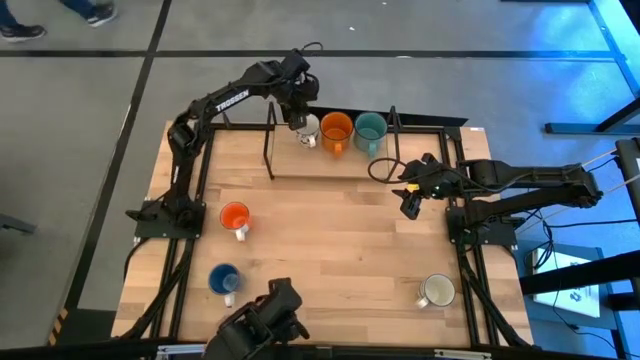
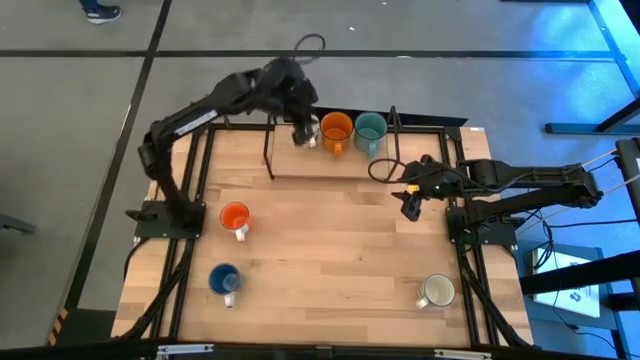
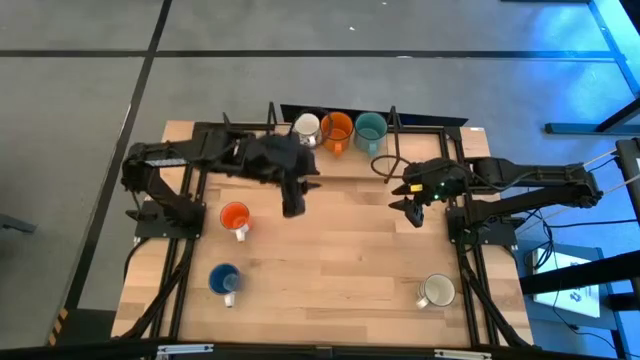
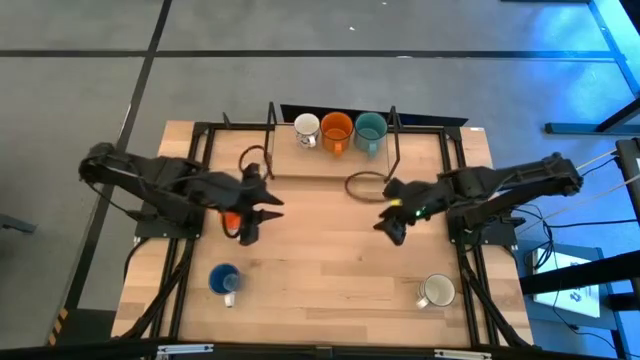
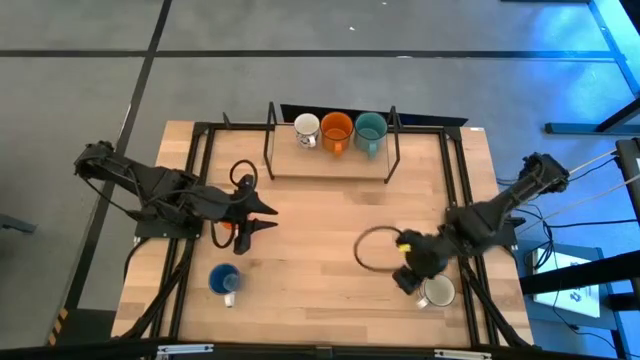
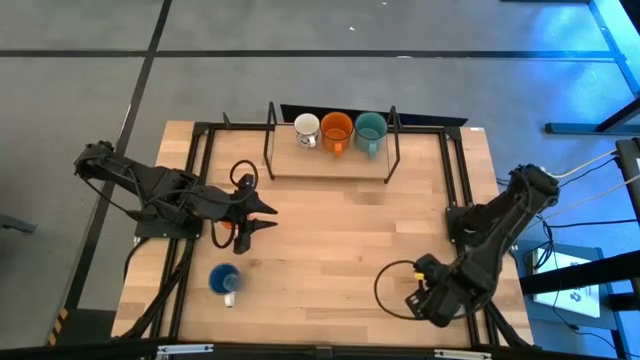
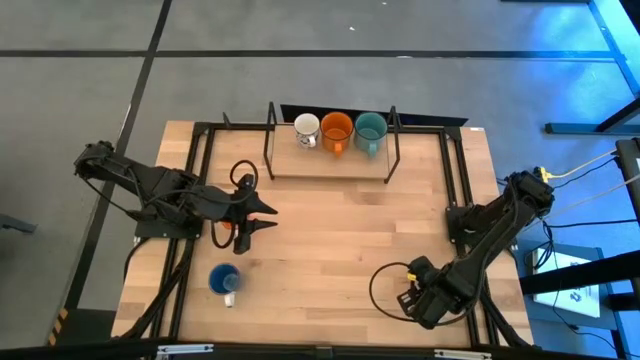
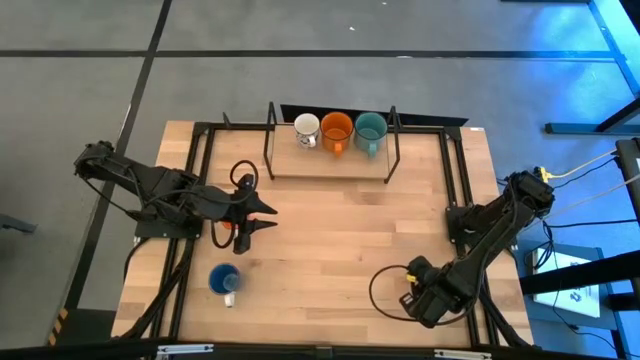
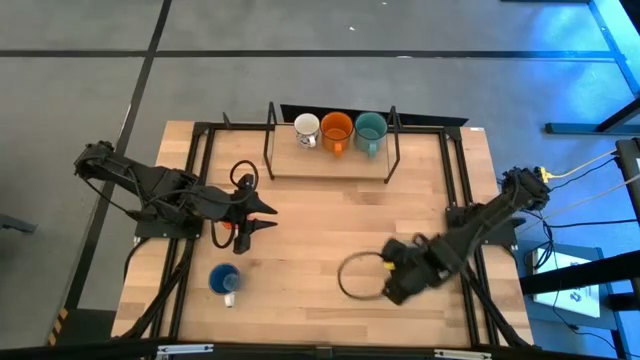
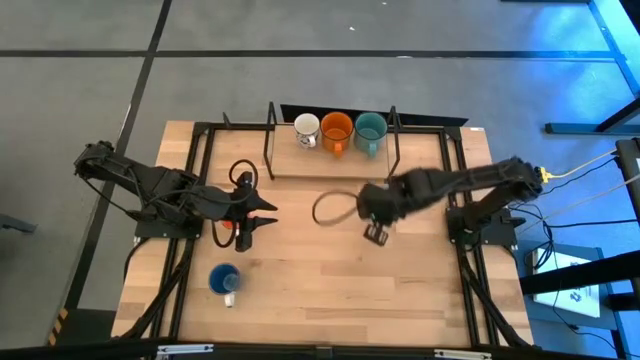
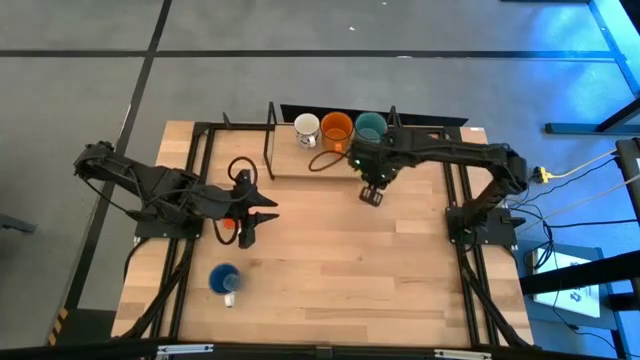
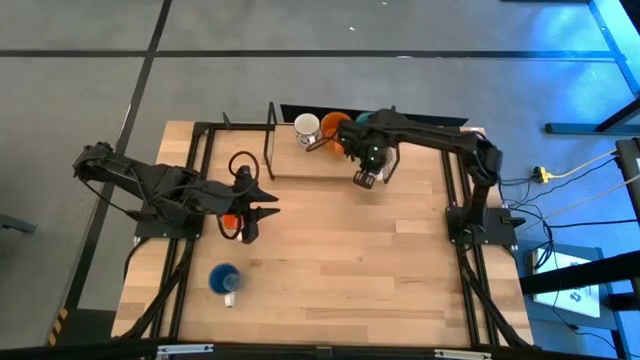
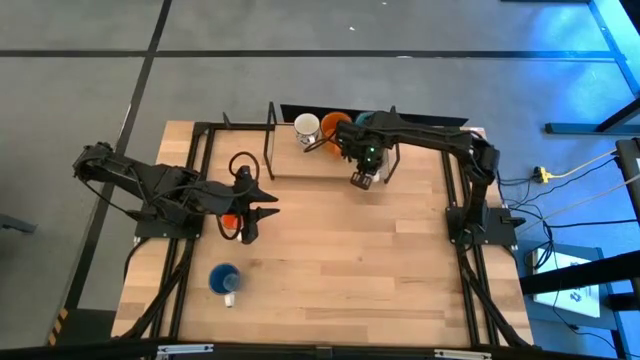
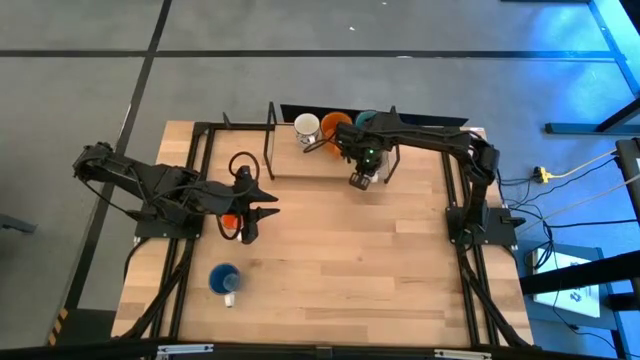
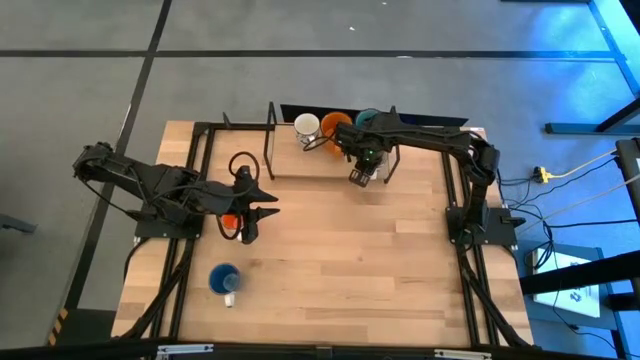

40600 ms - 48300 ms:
Task: Place coffee mugs
Put the white patterned mug on the shelf

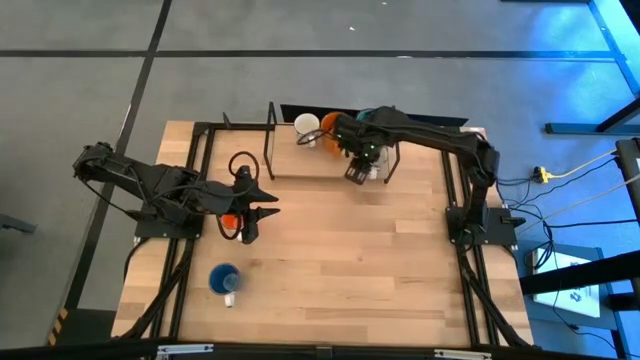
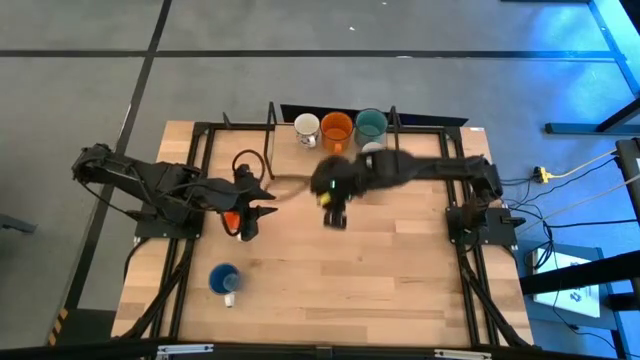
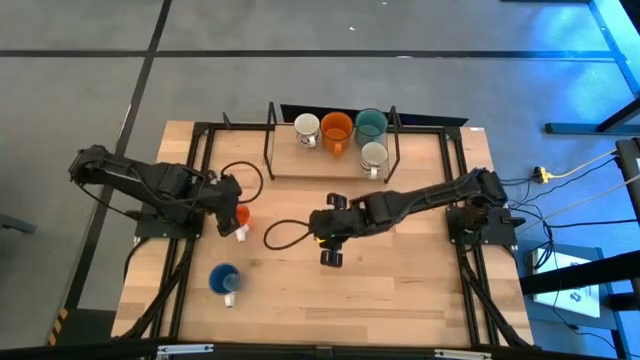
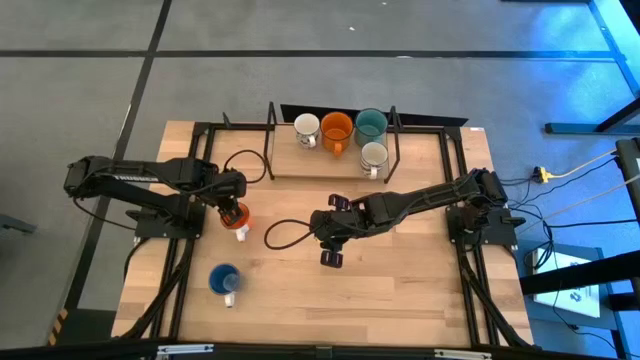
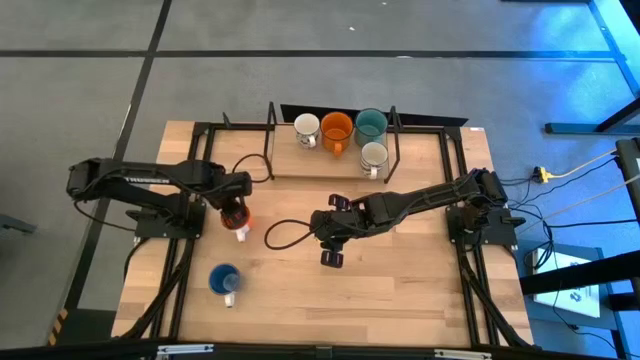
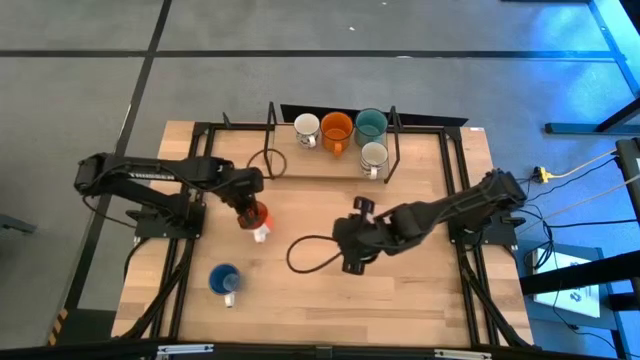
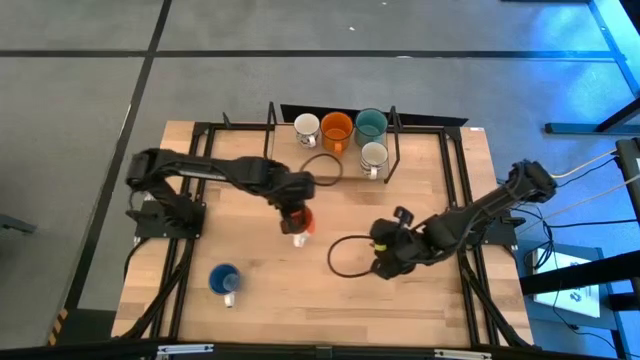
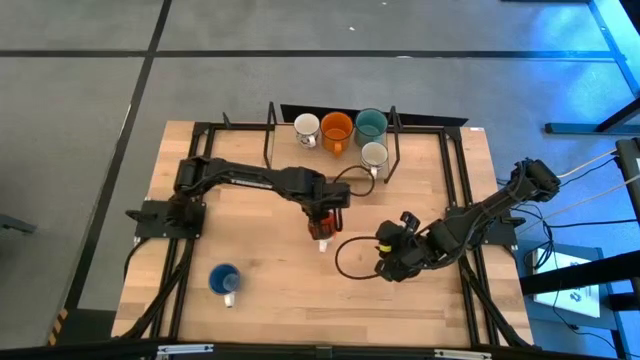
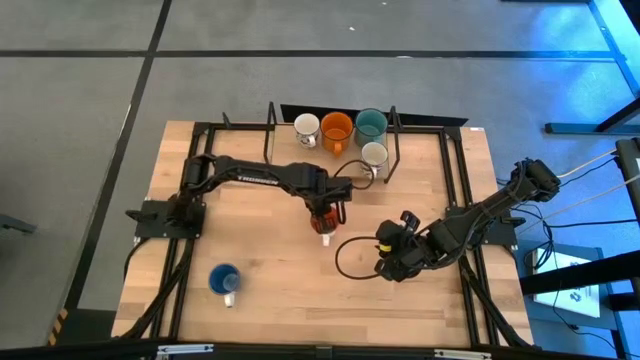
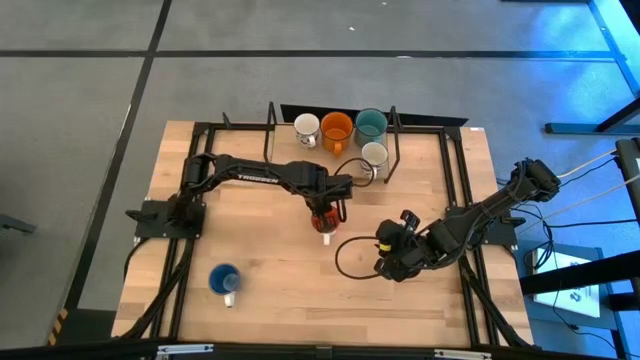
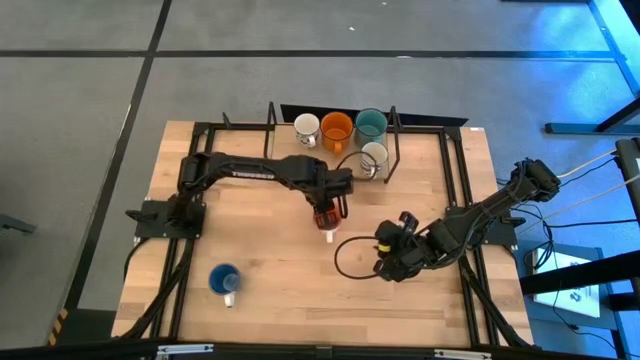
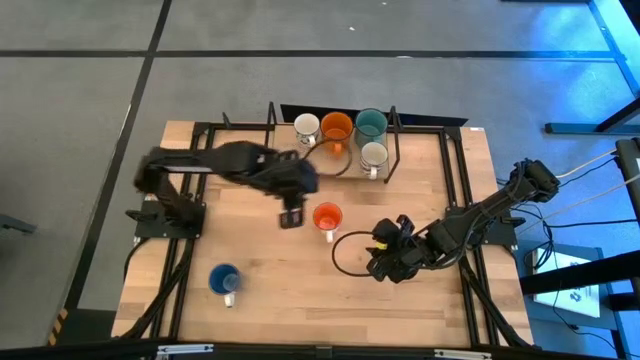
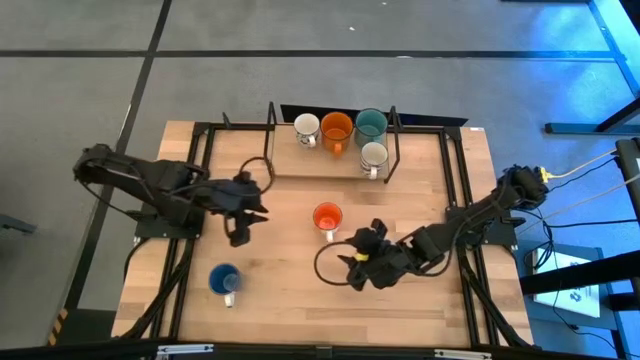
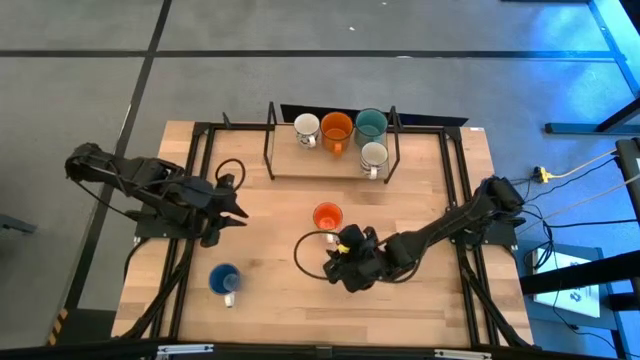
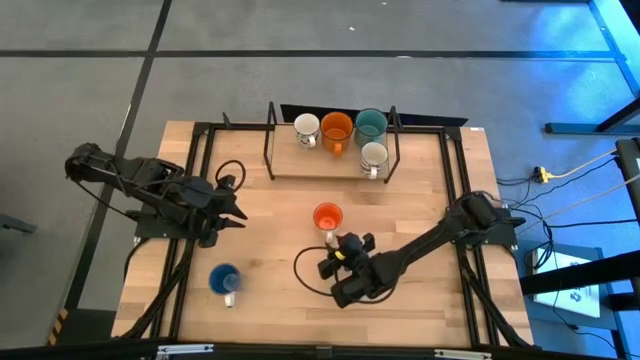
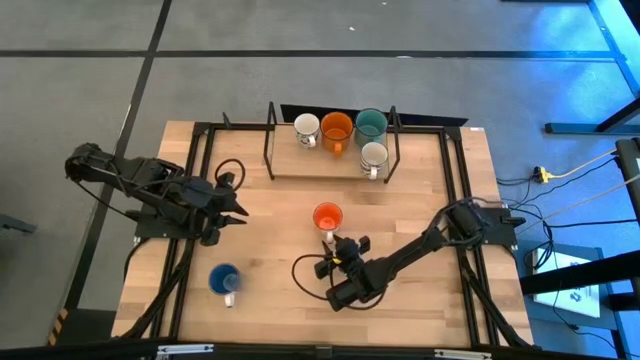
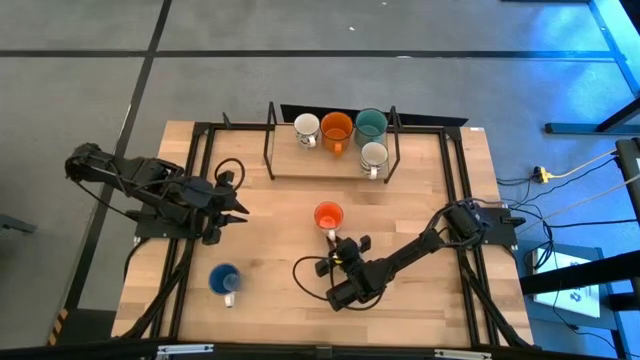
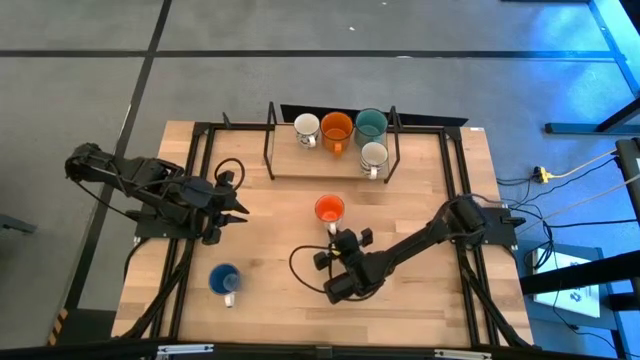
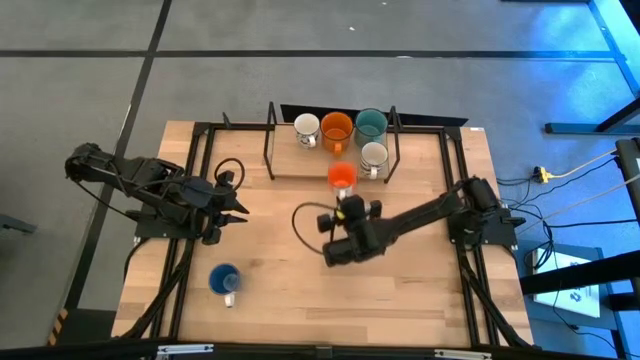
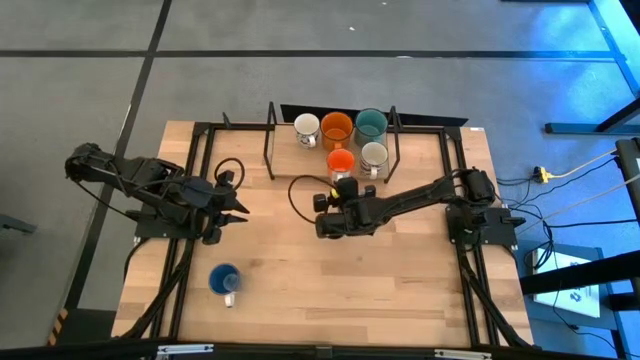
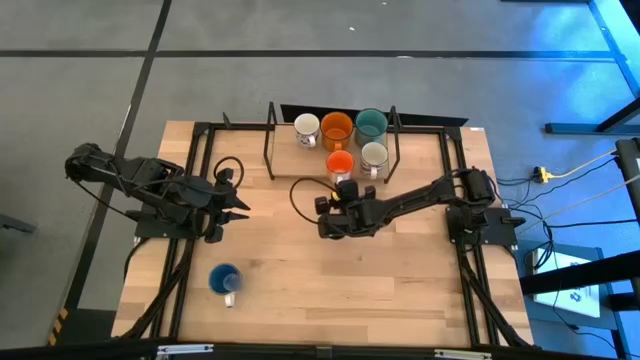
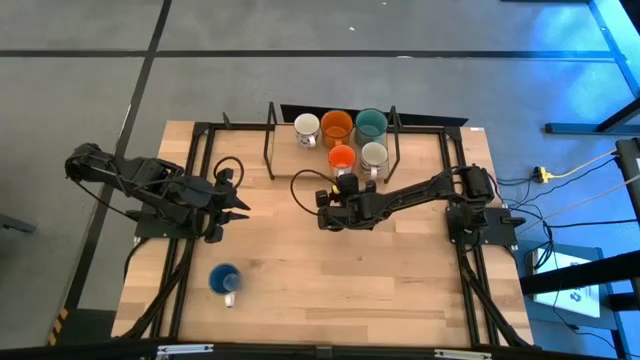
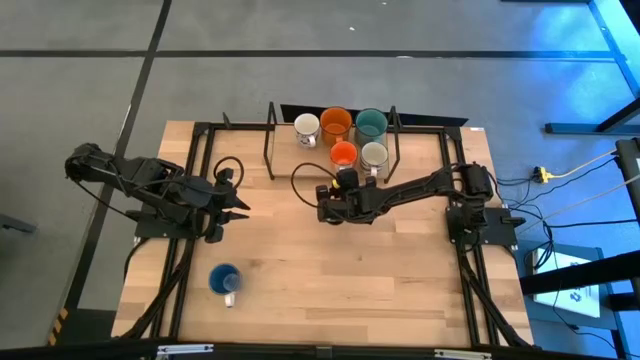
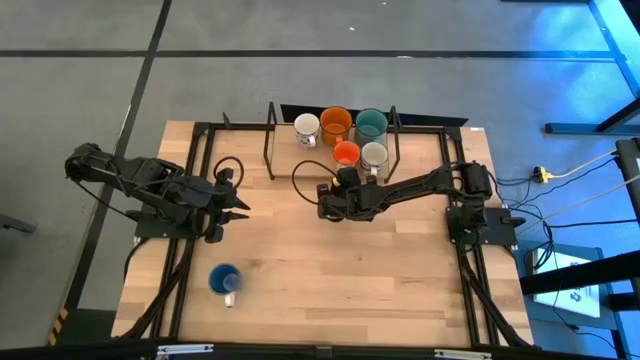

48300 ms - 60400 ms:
Put the orange-white mug on the shelf
